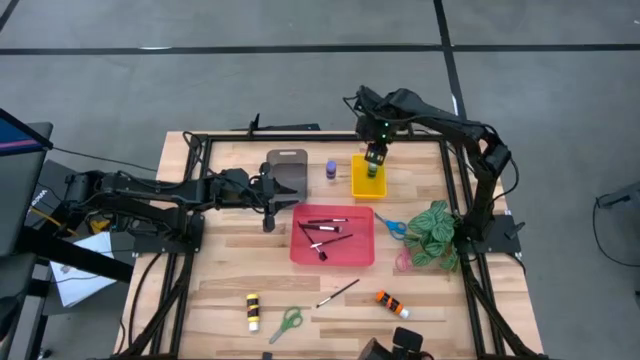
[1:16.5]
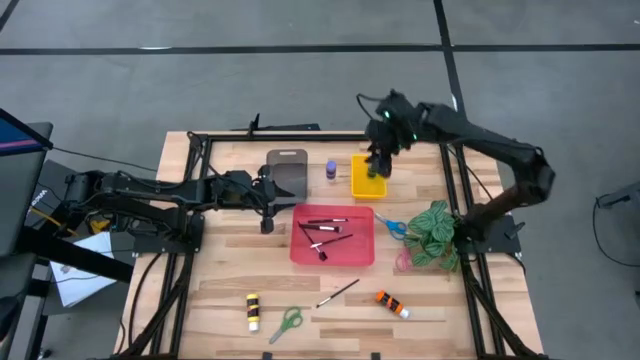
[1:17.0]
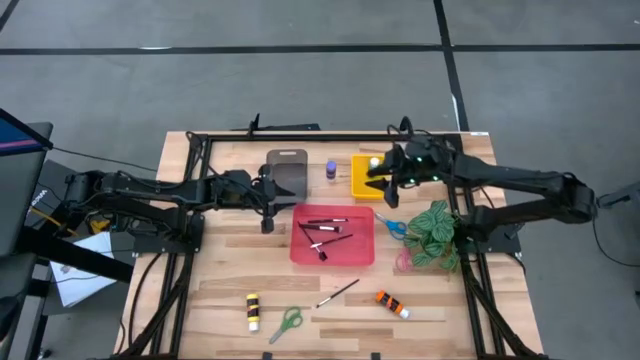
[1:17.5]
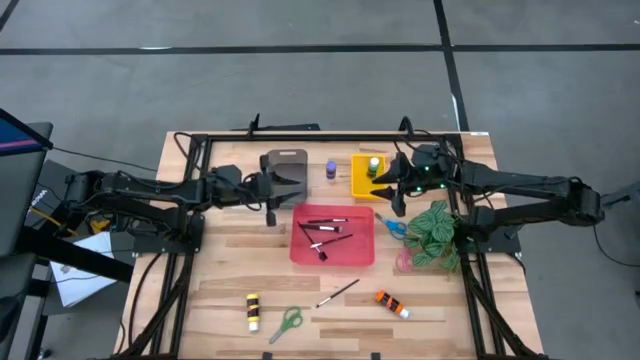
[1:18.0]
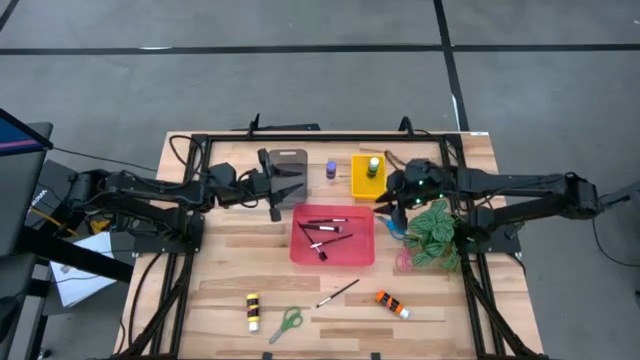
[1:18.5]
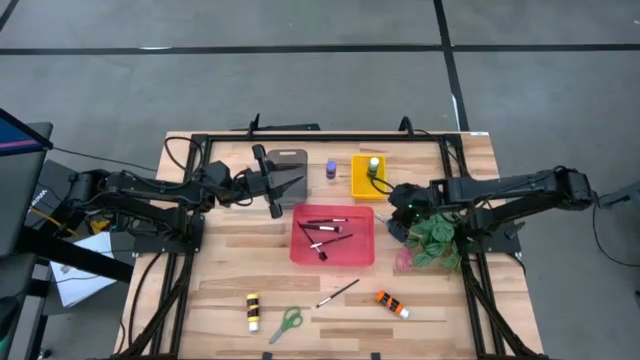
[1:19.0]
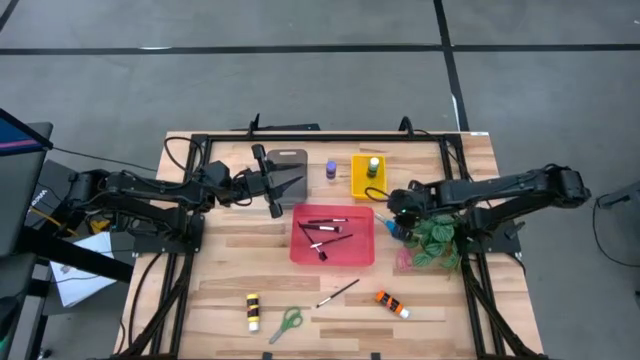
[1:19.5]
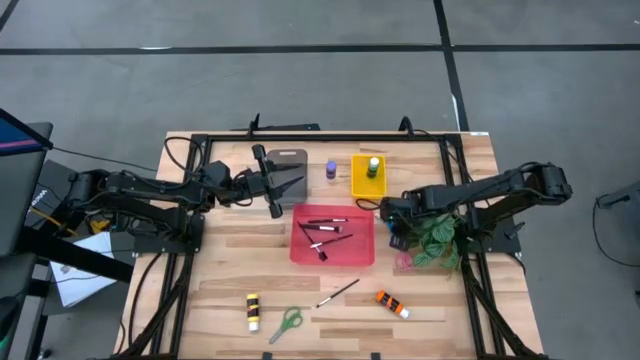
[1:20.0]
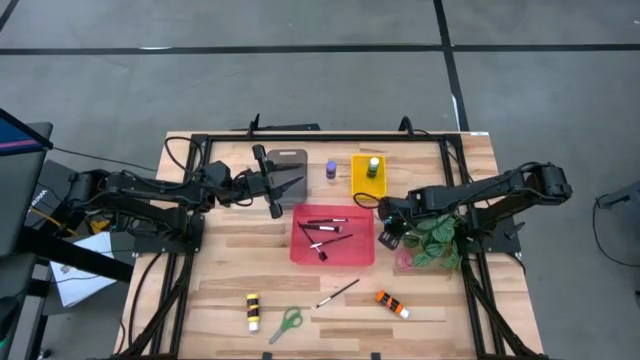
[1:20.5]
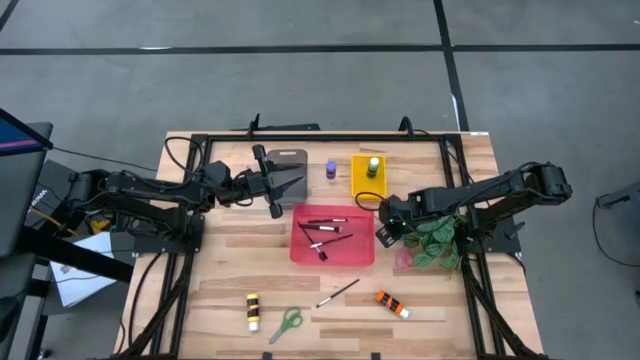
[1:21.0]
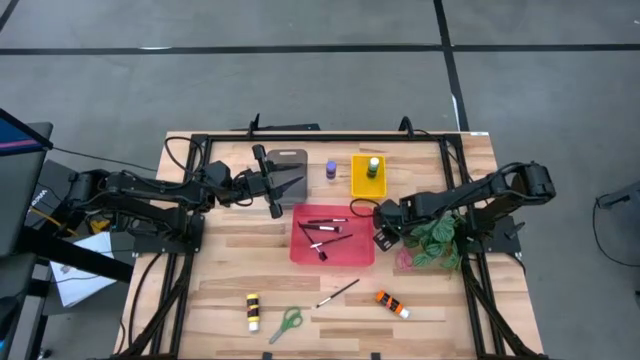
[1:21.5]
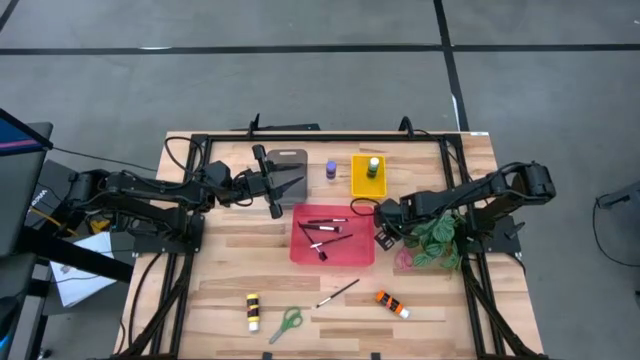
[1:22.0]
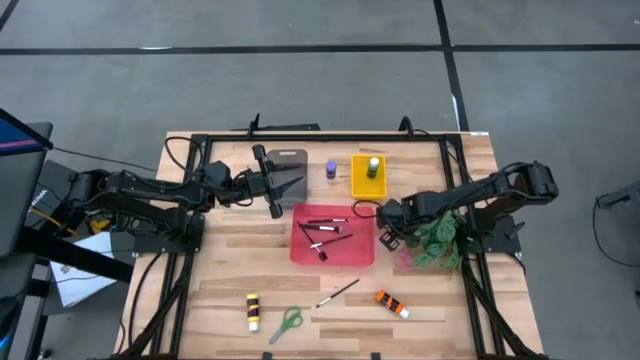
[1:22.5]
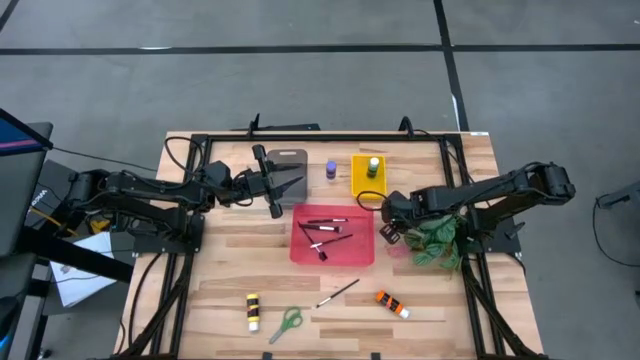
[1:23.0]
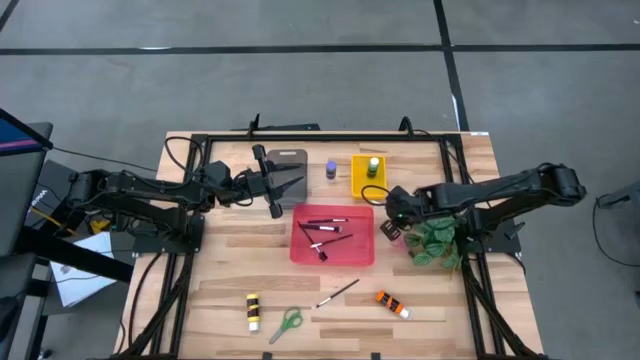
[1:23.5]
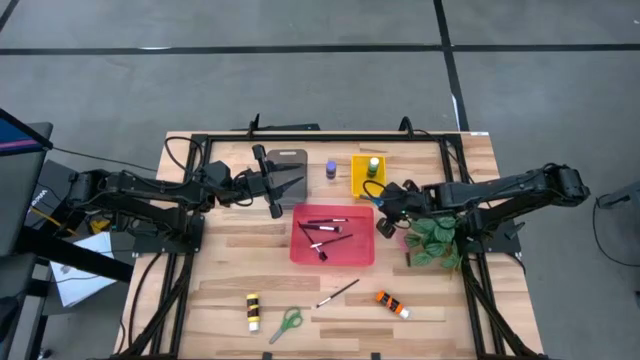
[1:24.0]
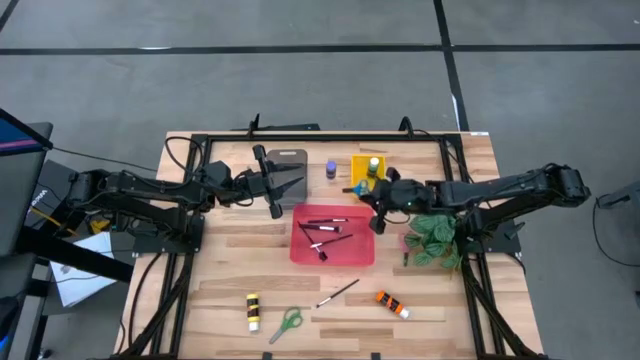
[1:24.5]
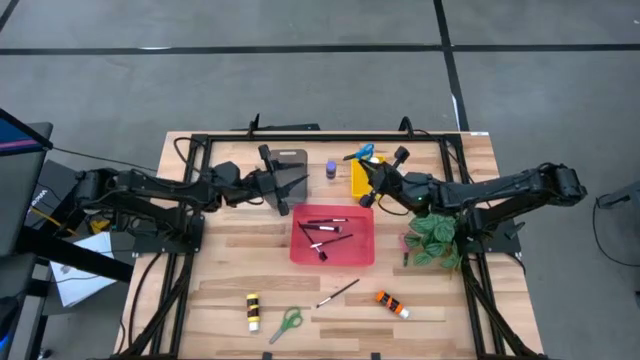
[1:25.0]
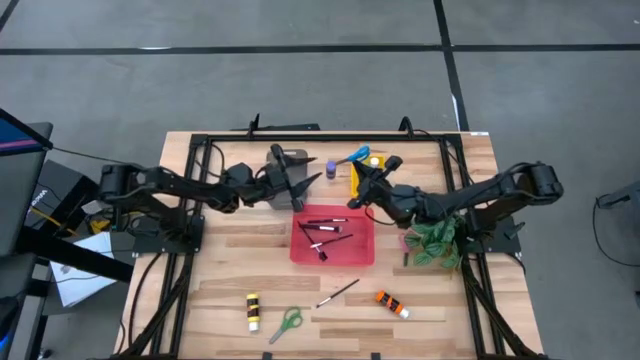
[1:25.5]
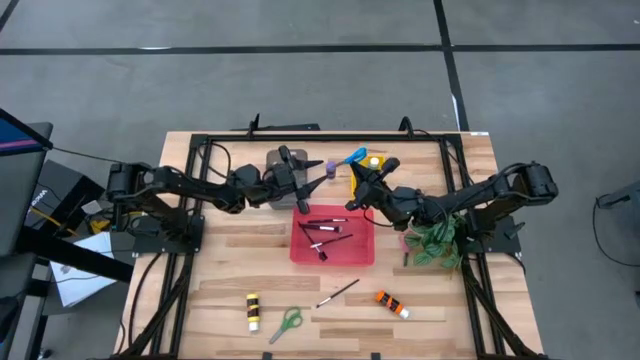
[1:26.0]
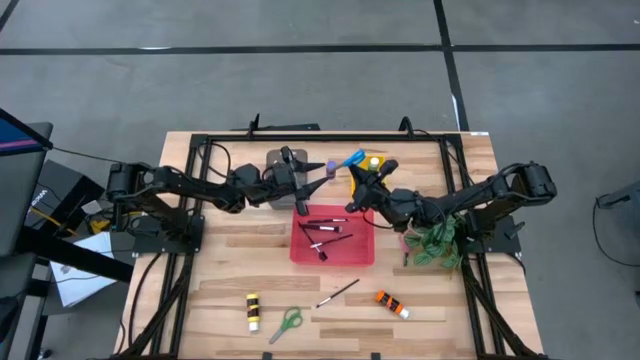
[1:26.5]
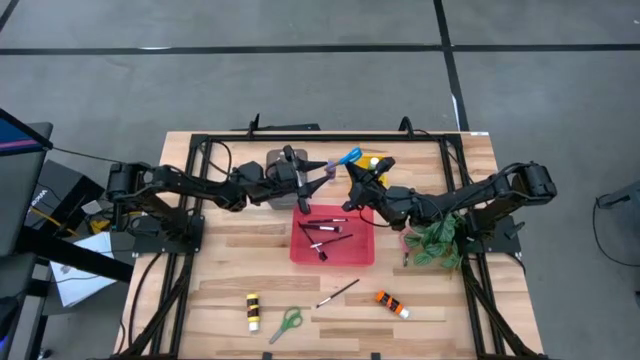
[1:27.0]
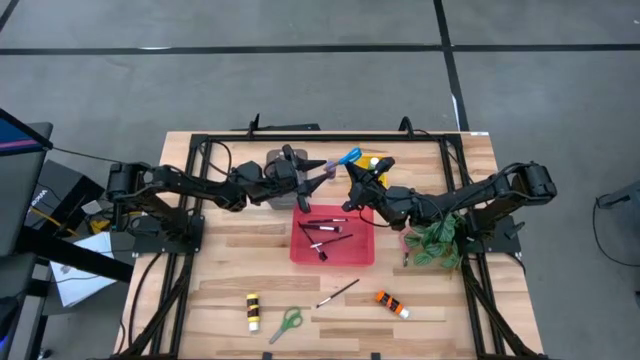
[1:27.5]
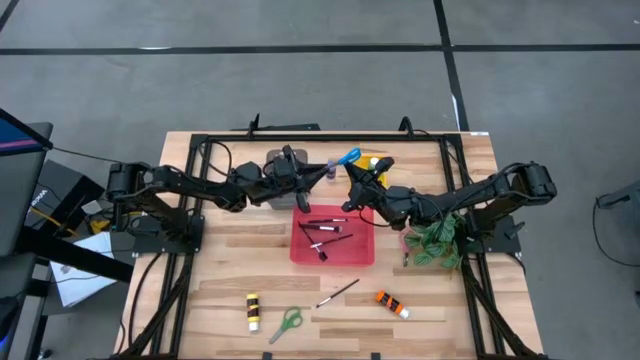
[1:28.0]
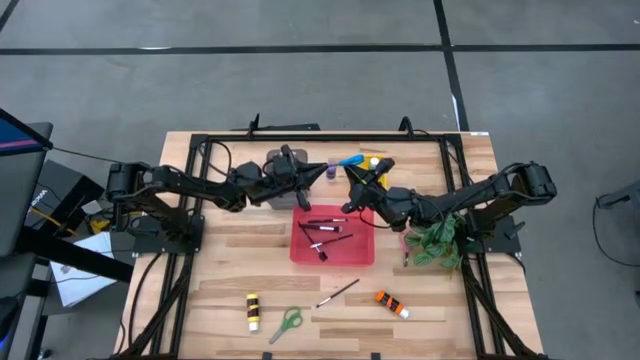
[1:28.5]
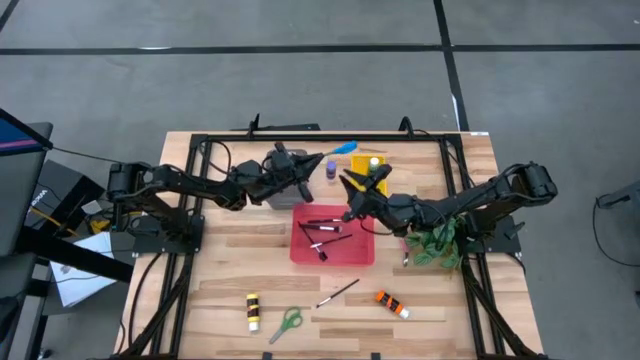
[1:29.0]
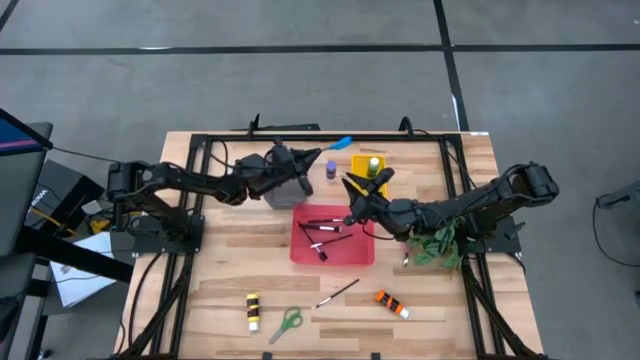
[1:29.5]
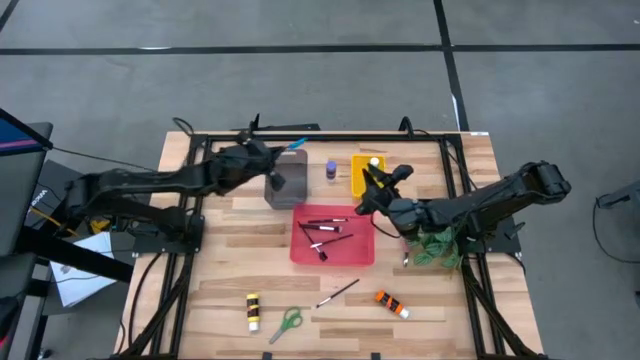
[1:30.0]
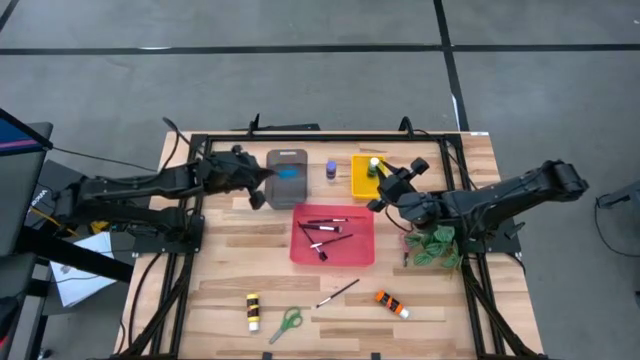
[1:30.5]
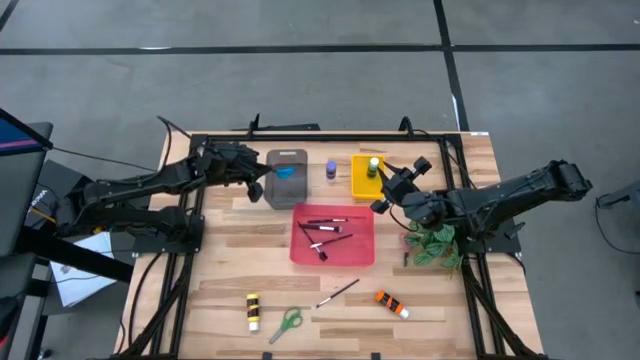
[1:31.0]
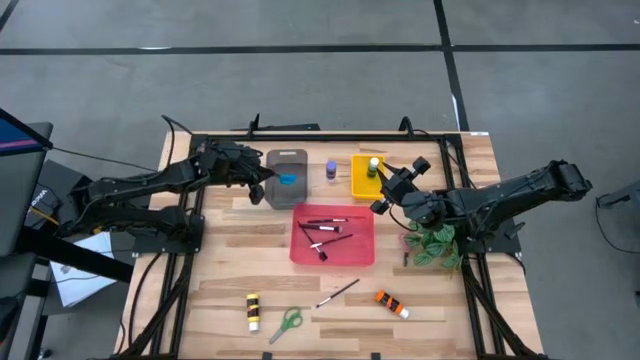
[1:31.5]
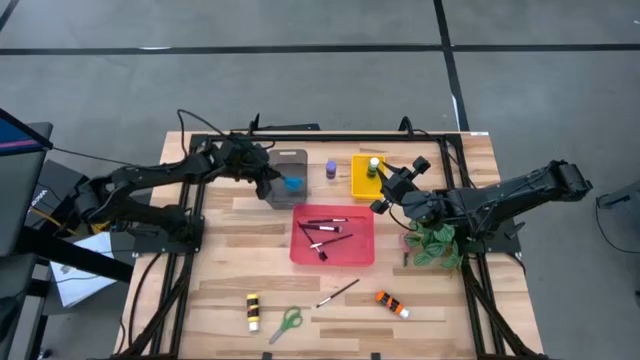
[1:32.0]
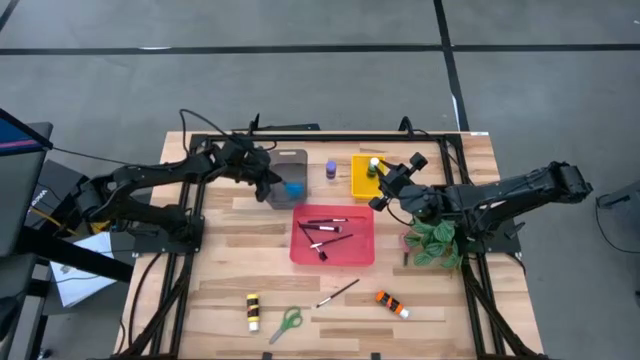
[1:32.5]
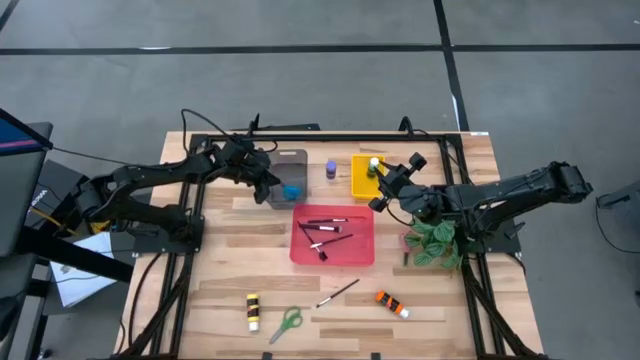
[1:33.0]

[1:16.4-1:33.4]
Task: Pick & Place Paint Supplies
Put the blue scissors into the black bin

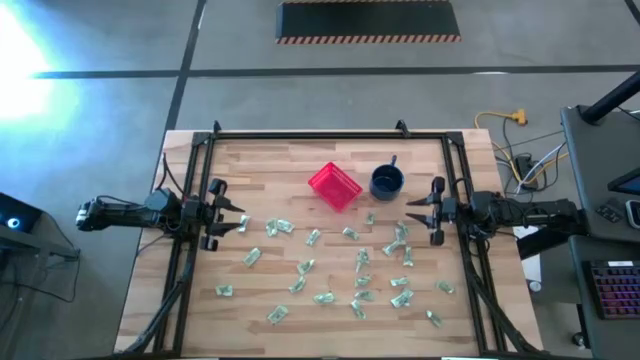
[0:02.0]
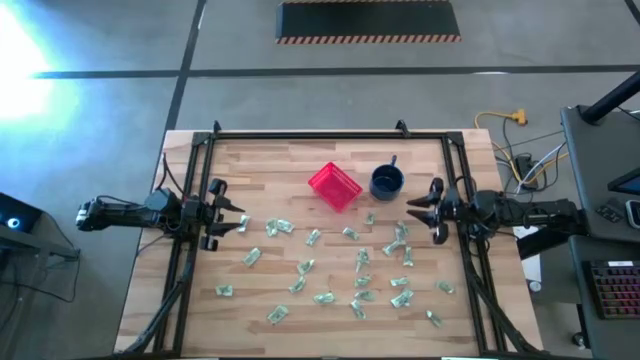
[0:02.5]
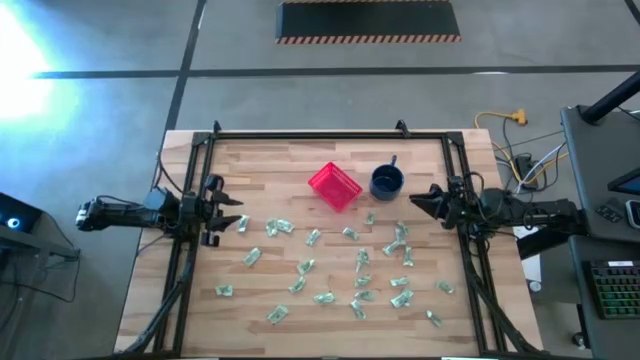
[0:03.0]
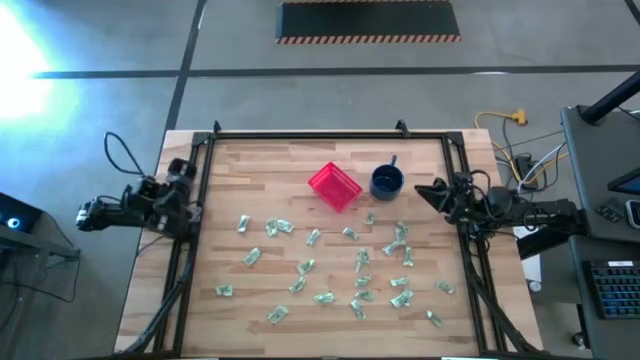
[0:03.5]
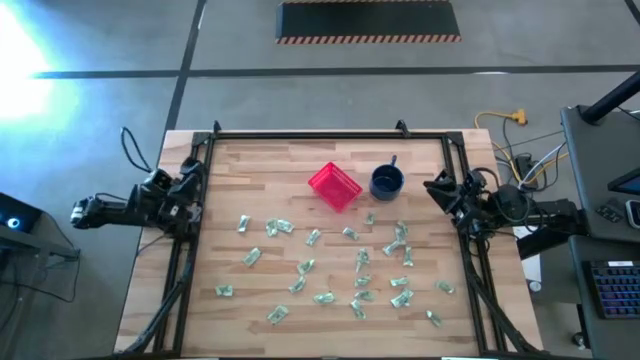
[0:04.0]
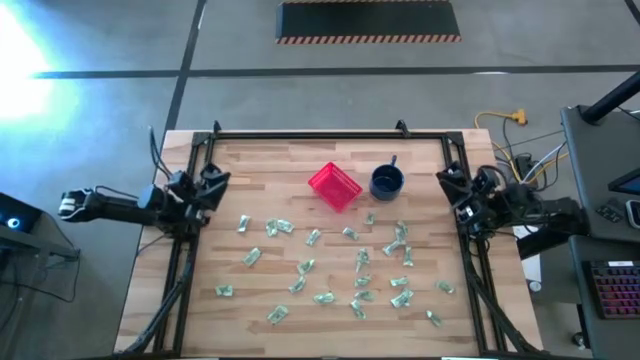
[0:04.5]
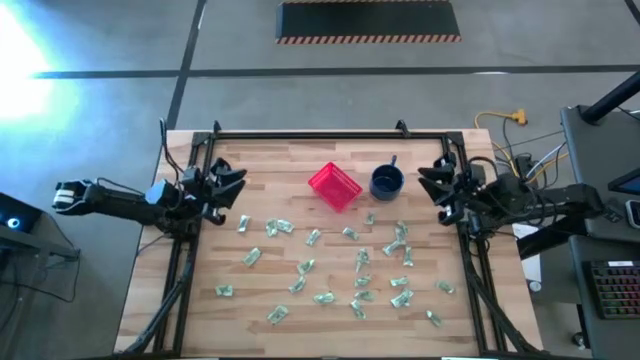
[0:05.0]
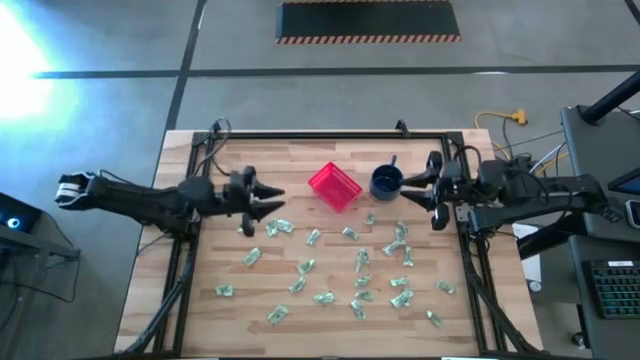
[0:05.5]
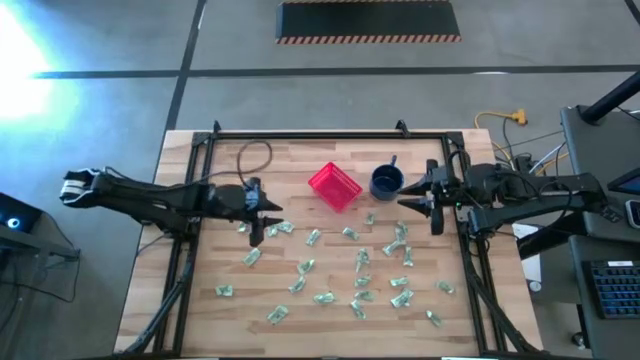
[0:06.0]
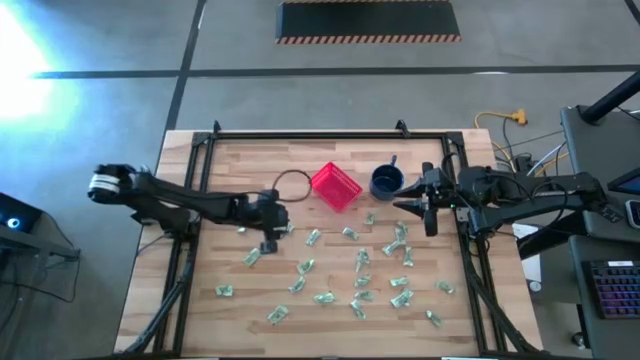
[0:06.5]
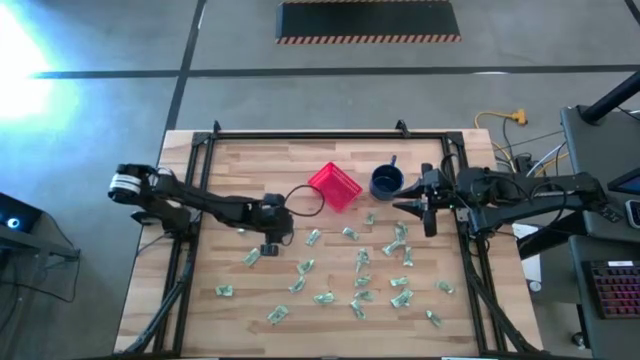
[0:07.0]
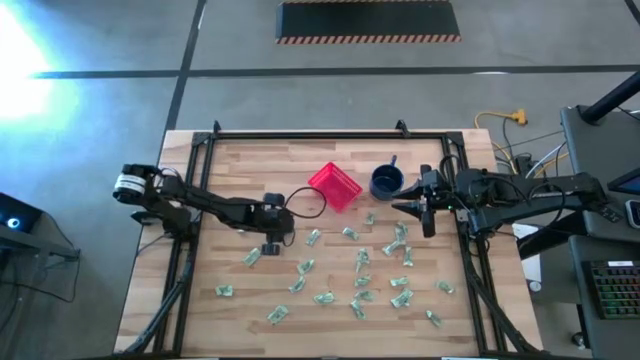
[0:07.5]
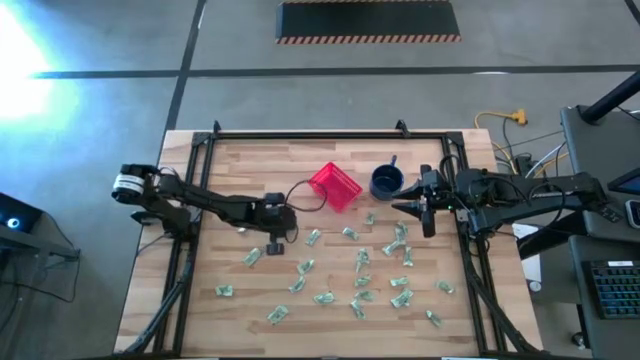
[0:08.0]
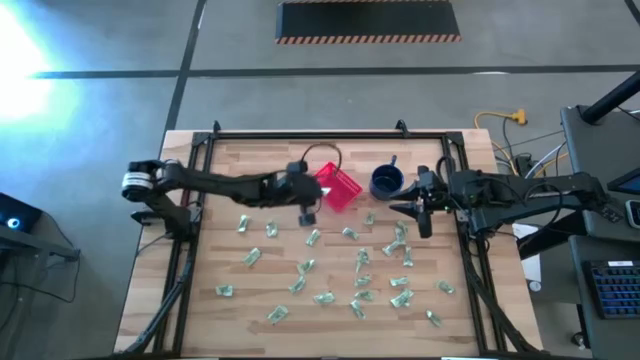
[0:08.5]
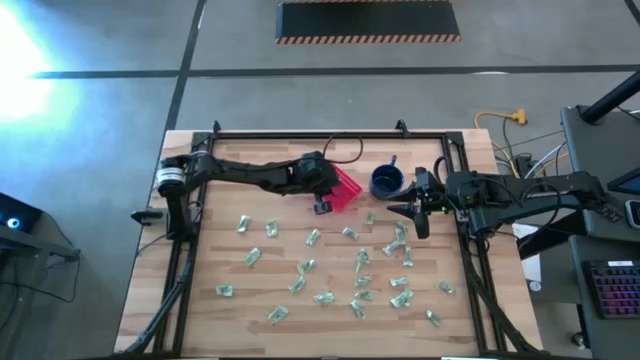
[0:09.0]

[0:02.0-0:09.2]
Task: Pick and place Stevia / Truvia into bins
Put the stevia packet into the red basket
